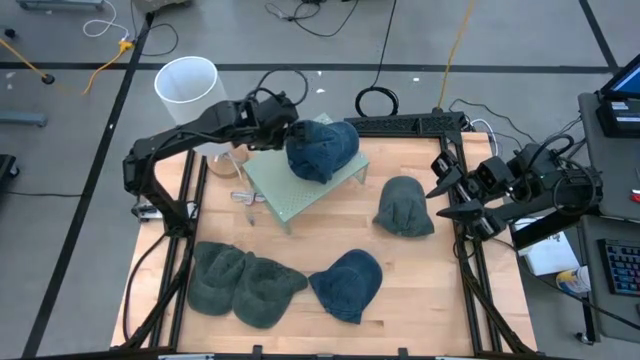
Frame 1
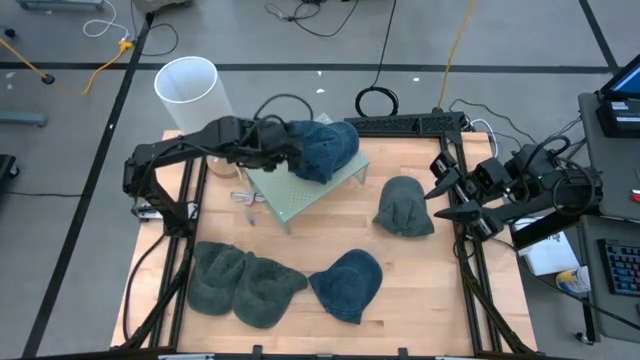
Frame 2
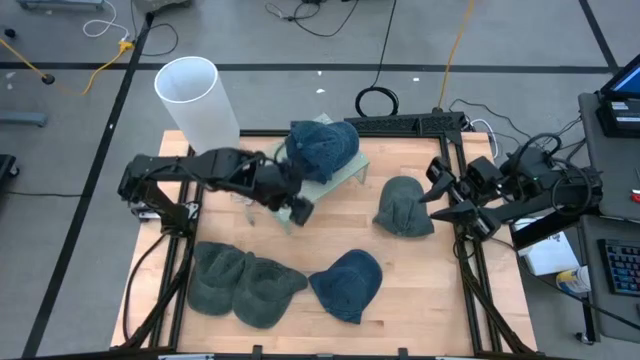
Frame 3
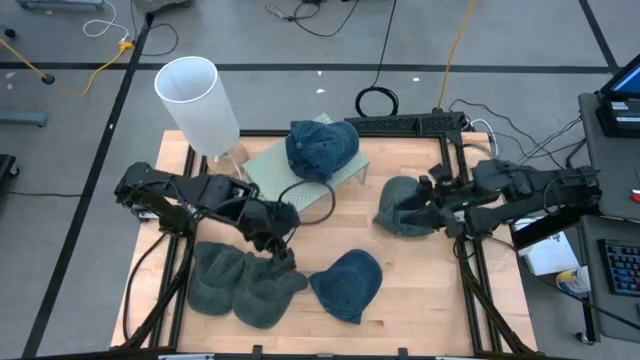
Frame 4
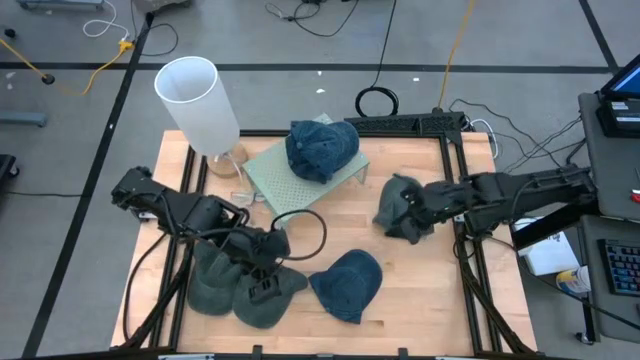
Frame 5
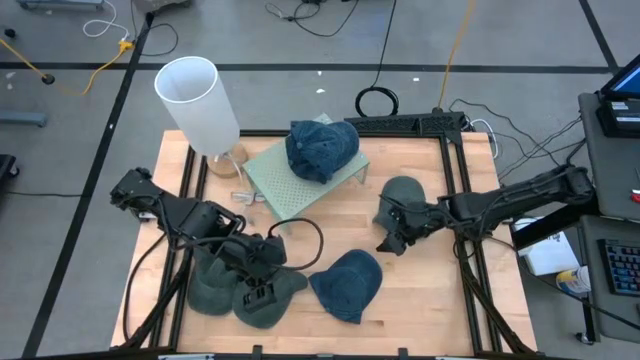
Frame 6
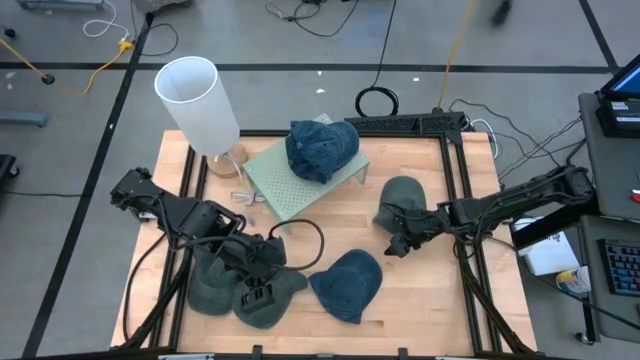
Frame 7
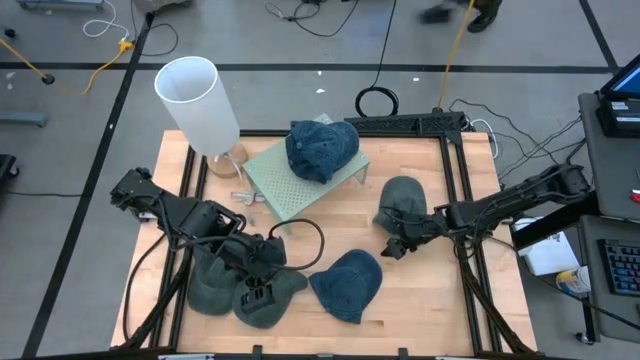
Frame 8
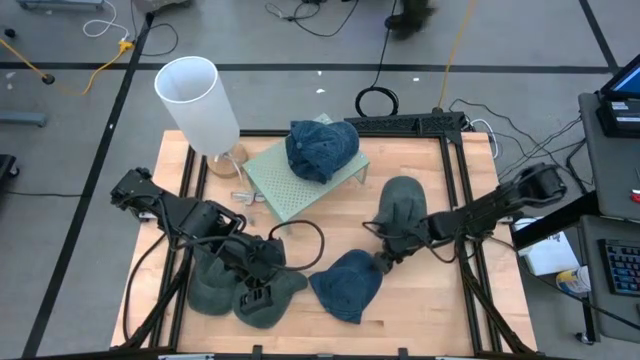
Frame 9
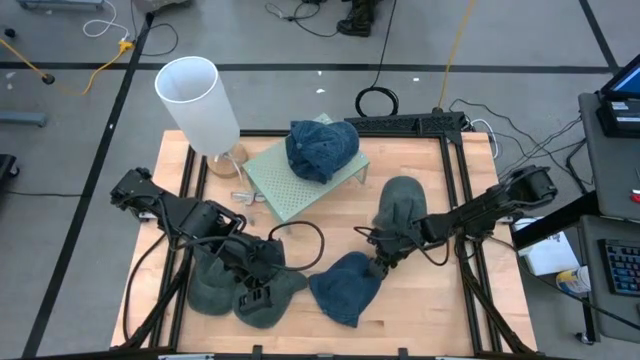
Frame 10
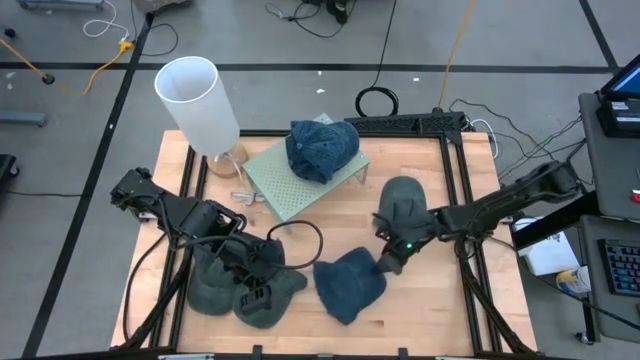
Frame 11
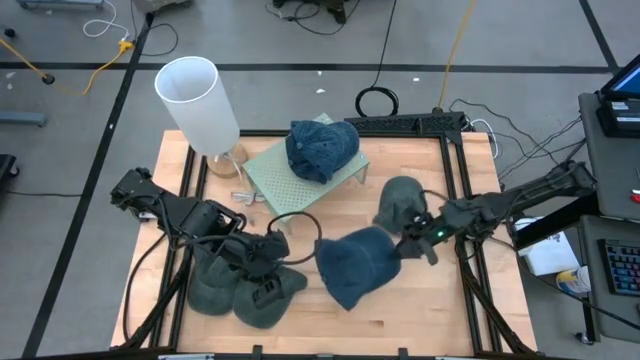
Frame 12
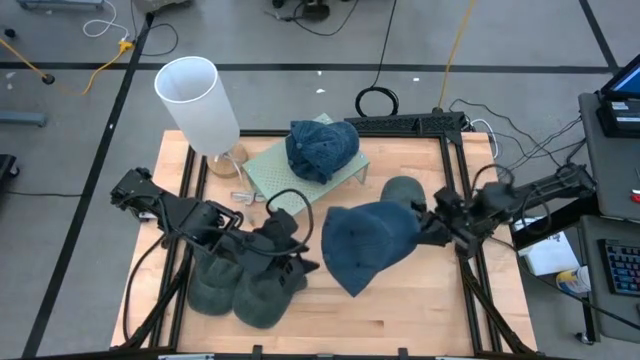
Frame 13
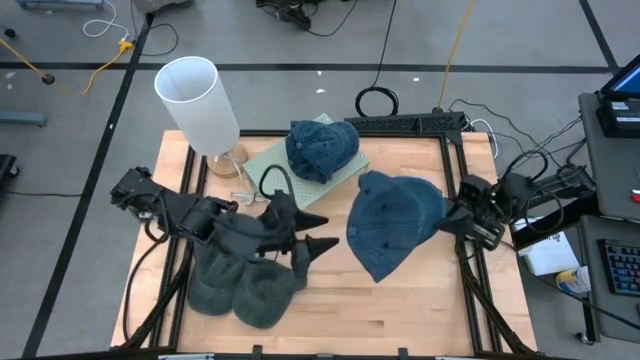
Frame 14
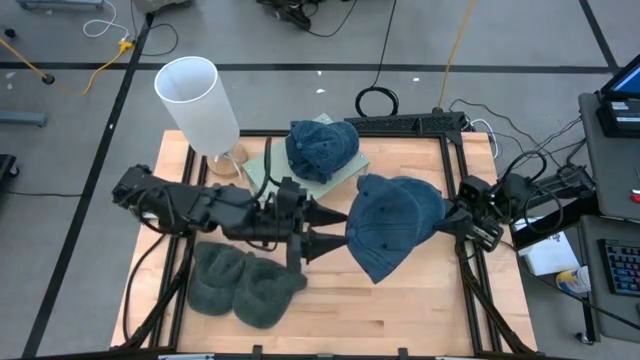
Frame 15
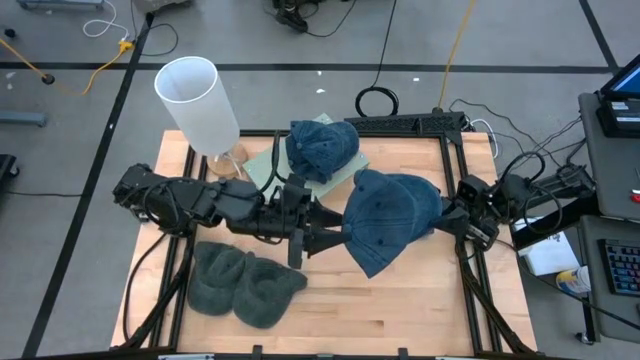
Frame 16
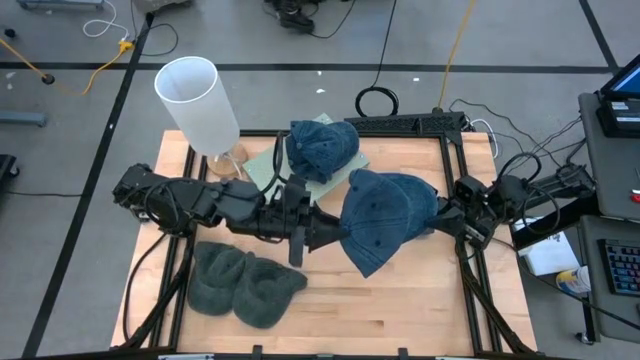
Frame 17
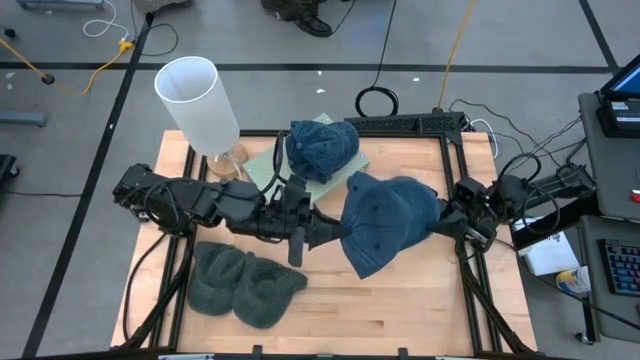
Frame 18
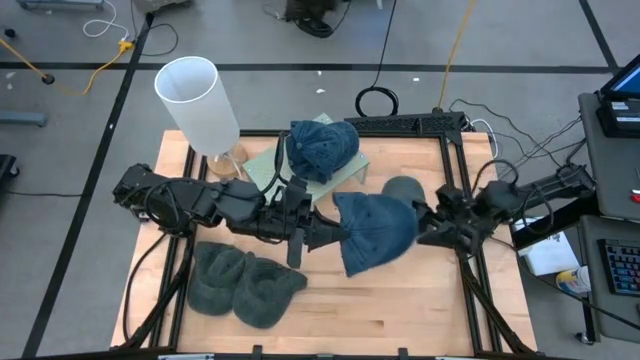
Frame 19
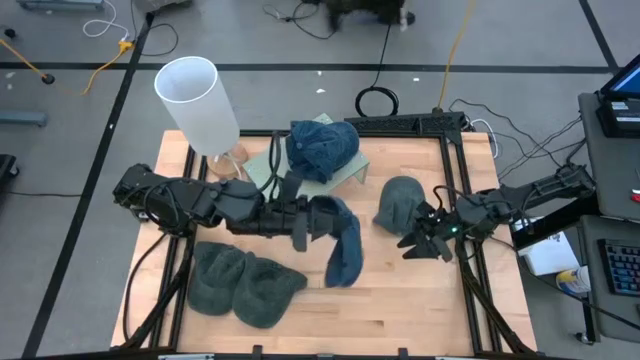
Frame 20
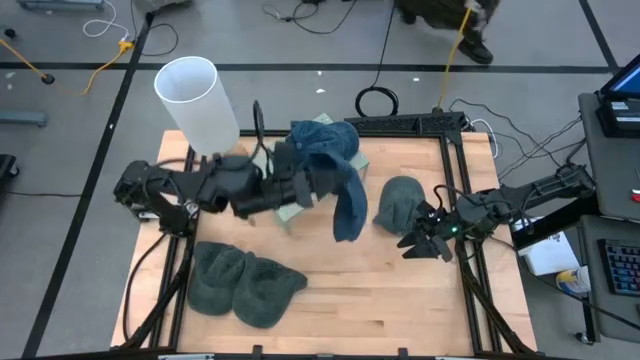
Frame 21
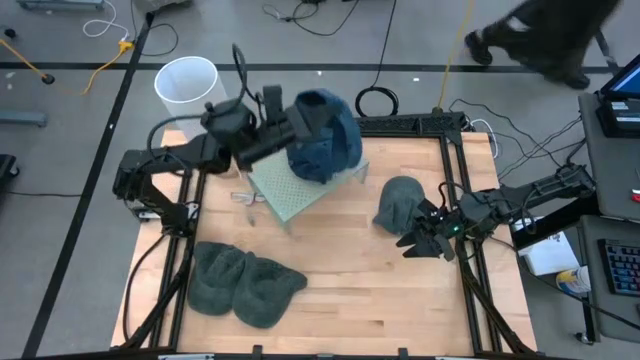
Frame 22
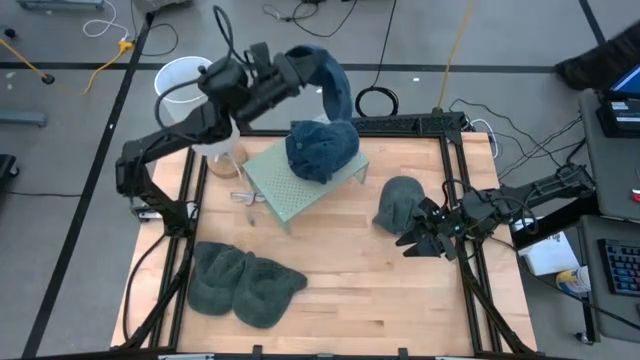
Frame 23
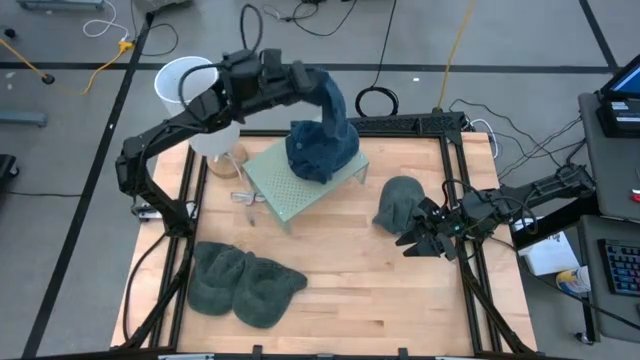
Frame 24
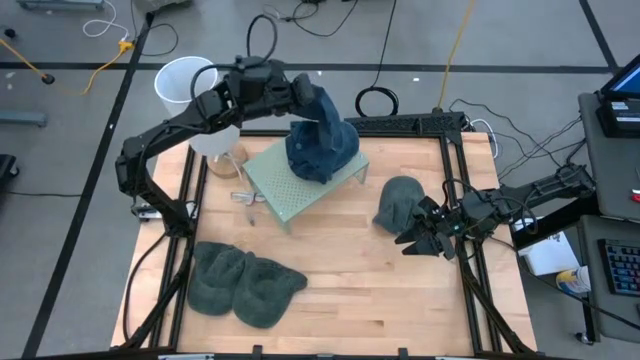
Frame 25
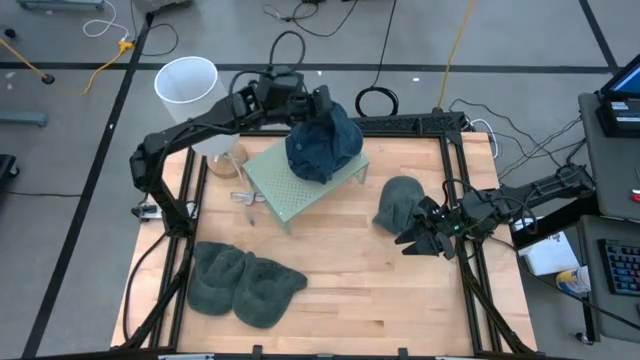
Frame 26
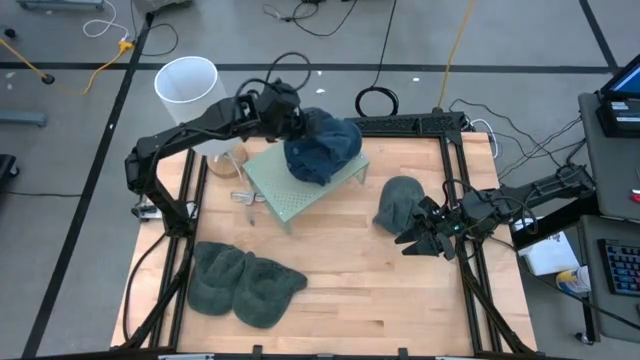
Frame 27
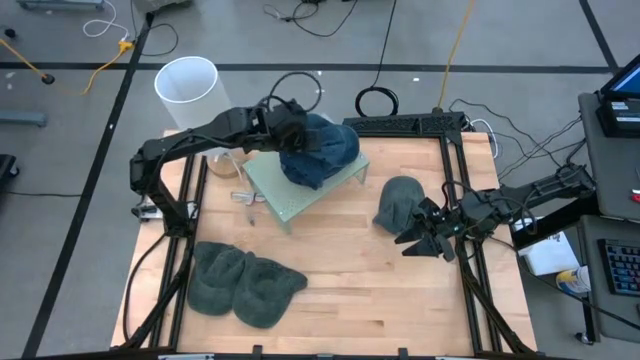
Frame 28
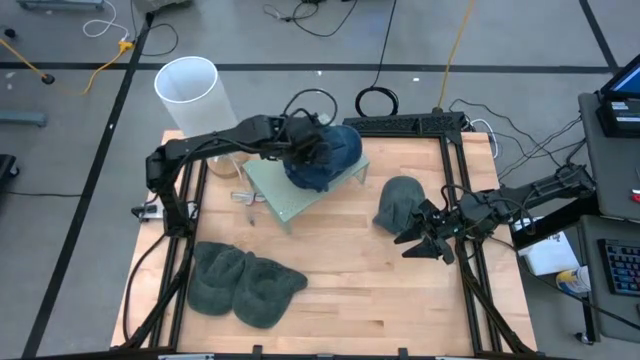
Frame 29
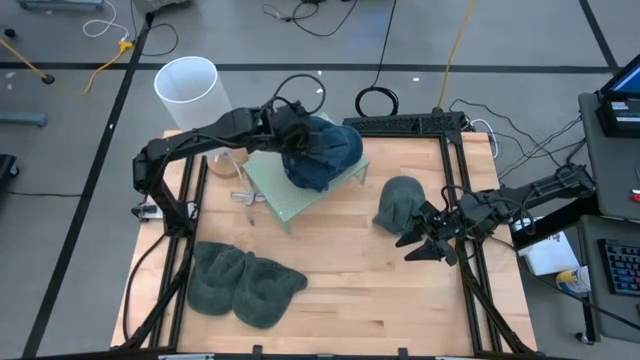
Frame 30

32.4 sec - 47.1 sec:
Task: Pick & Place hat
Stack the blue cap on the other blue cap on the shelf
